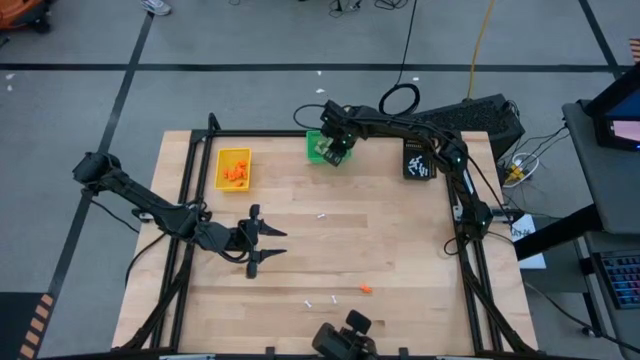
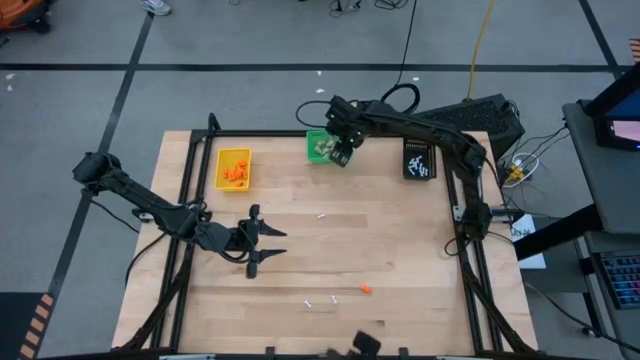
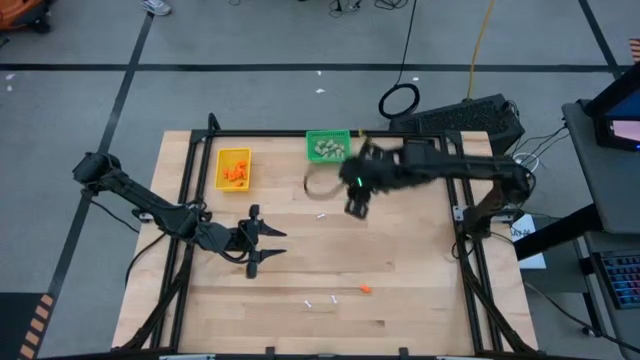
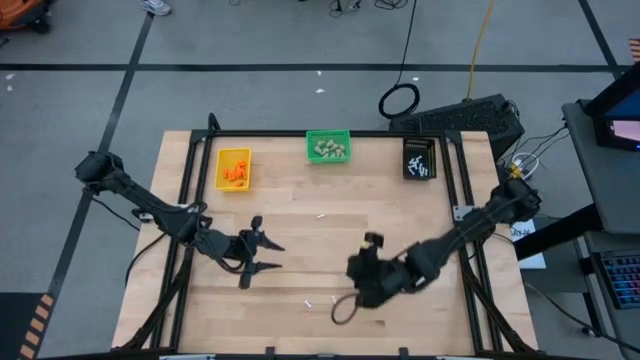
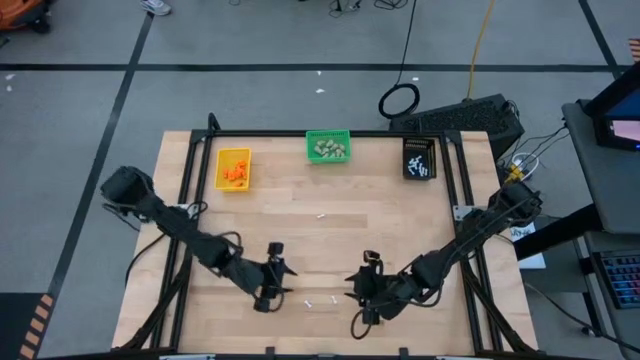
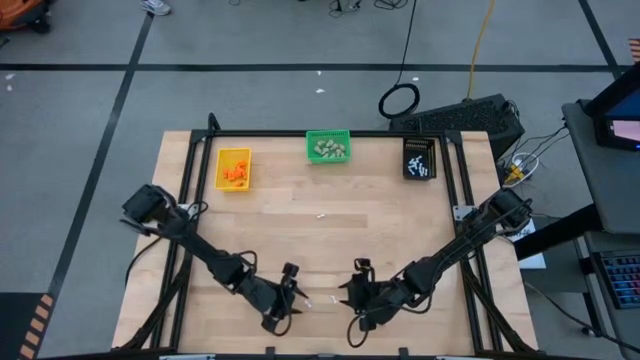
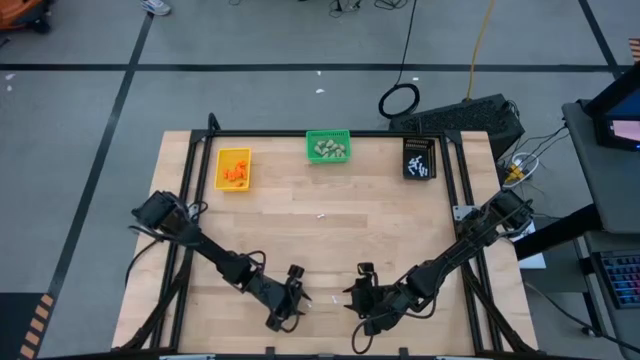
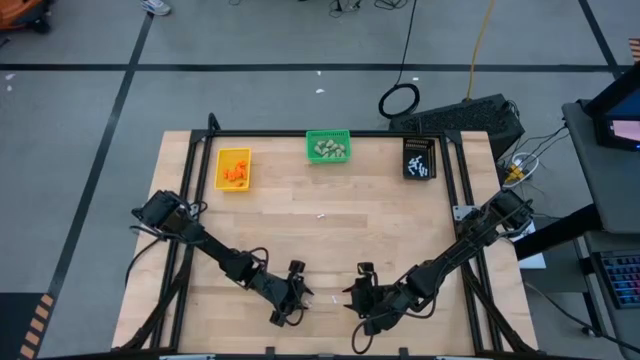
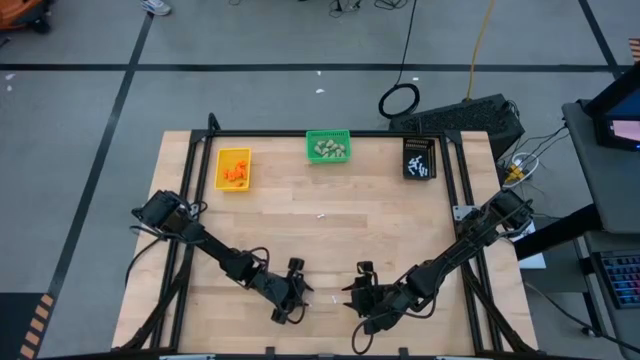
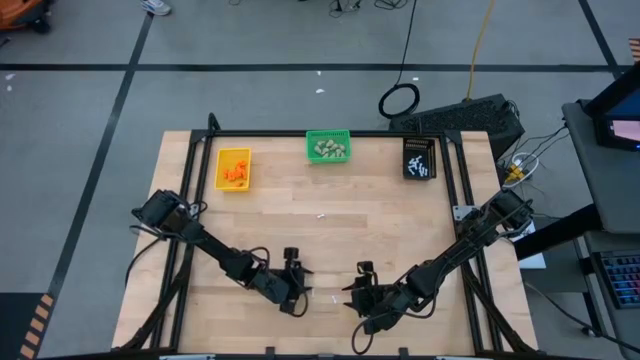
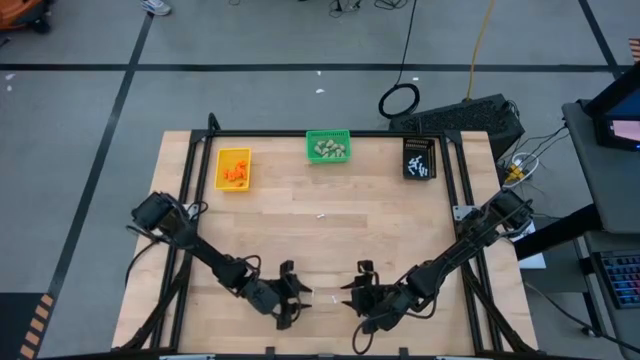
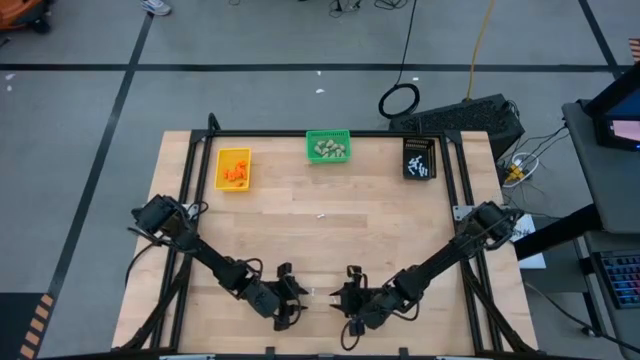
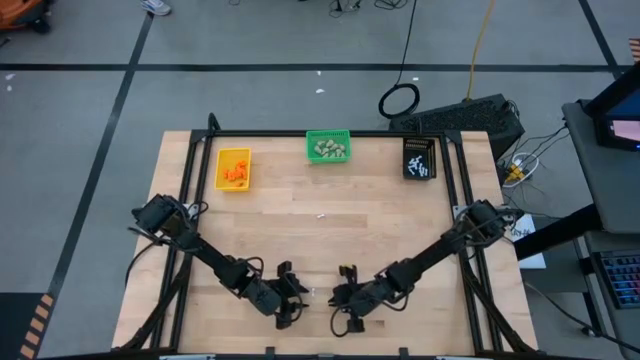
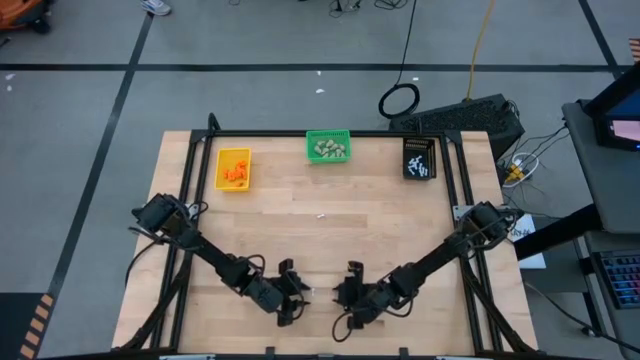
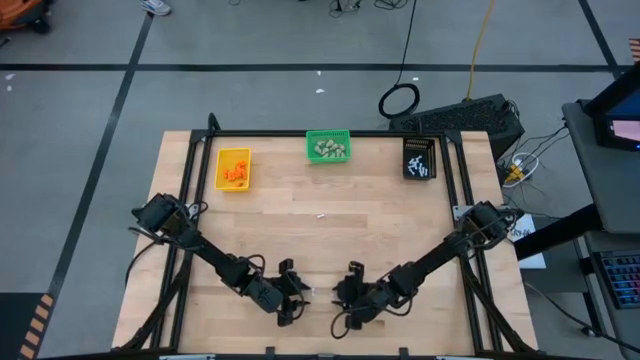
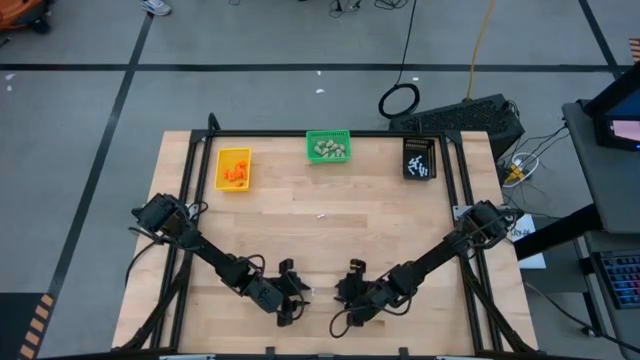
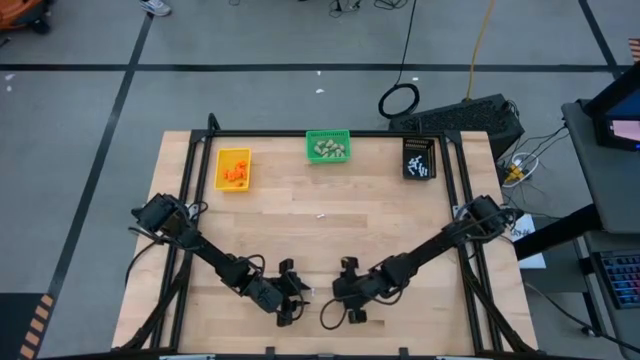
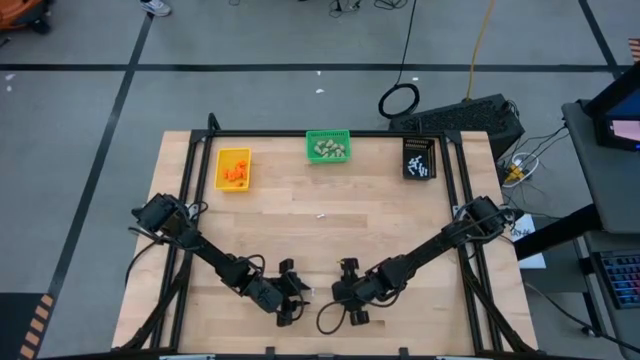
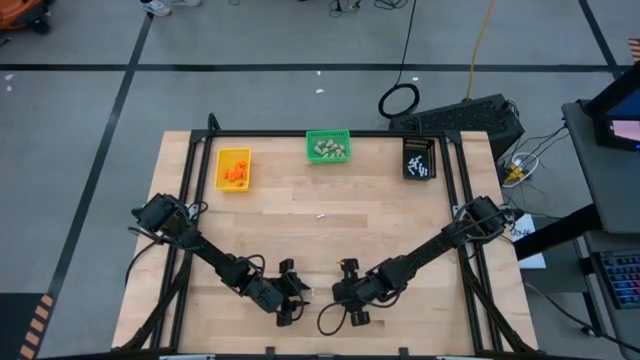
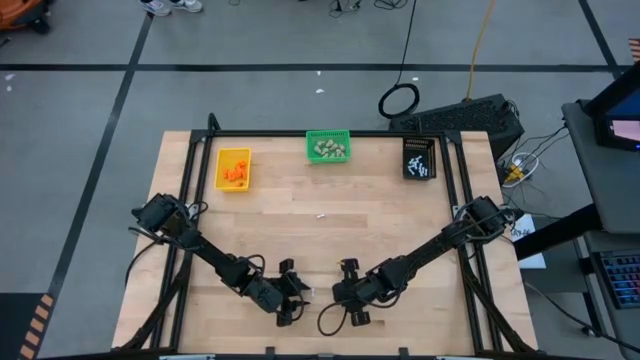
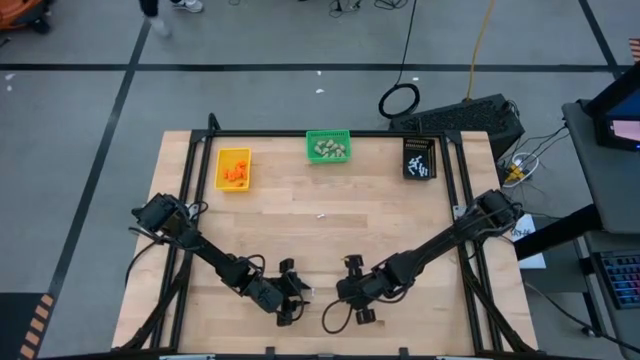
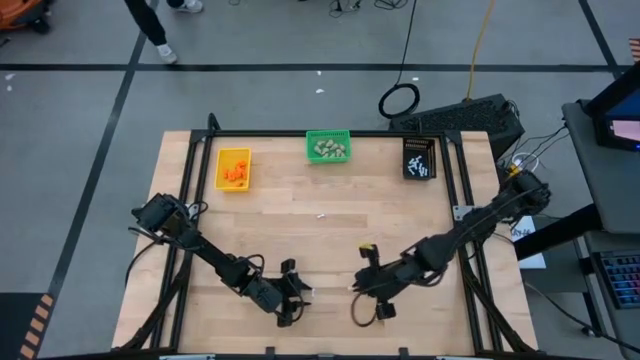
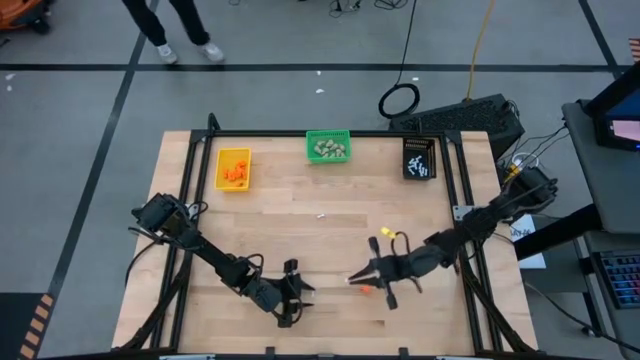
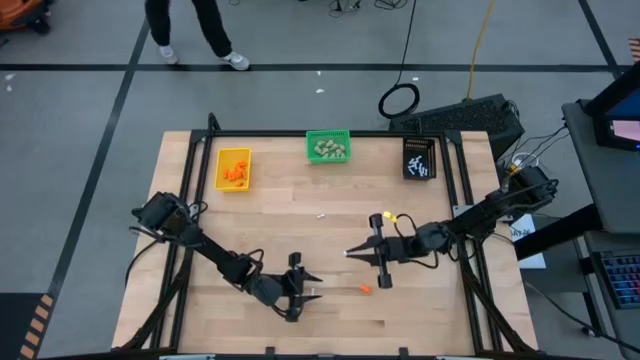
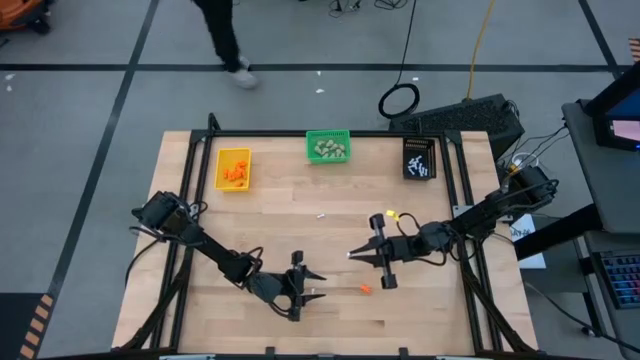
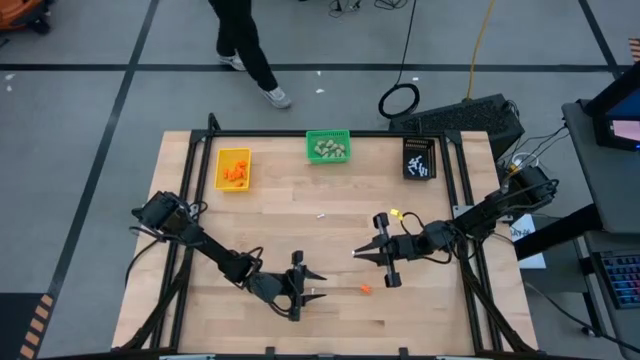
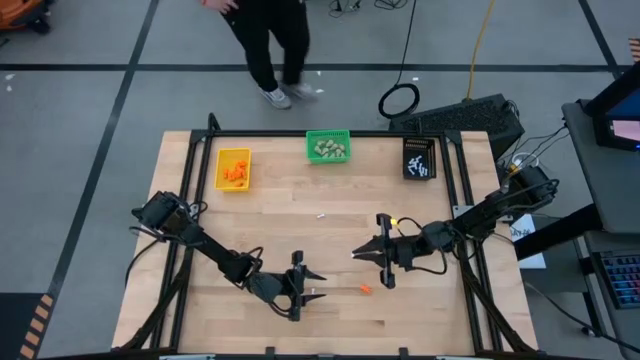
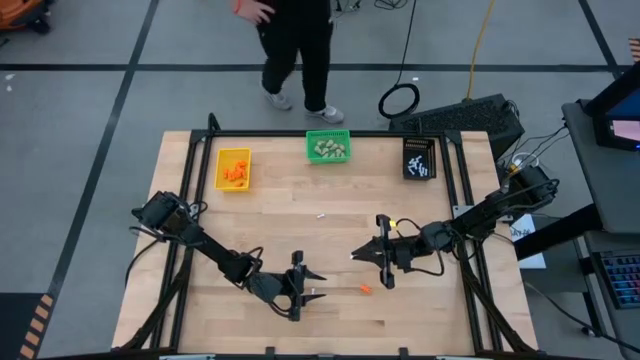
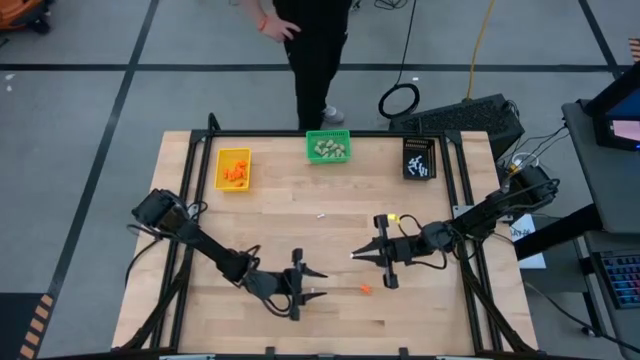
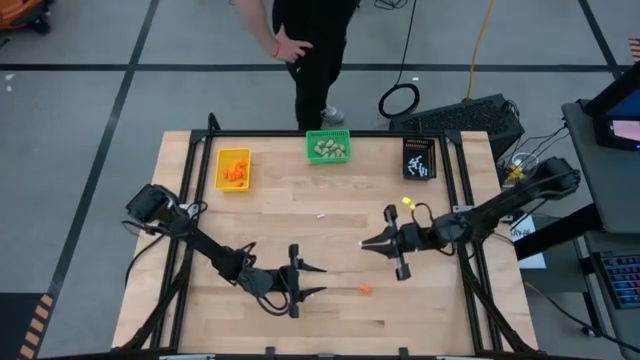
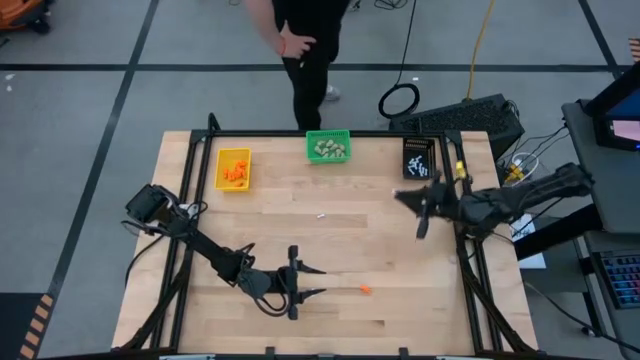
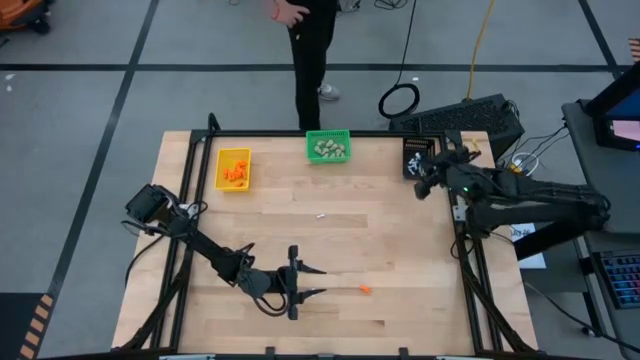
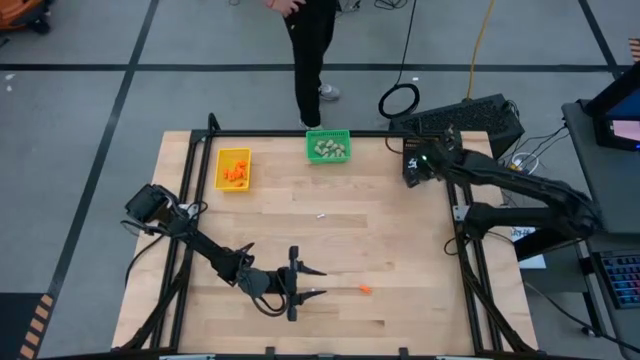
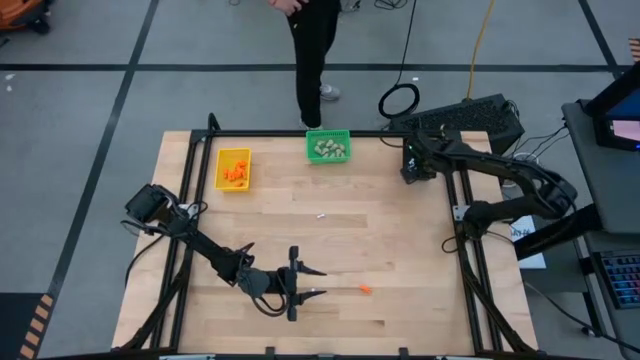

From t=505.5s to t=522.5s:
Task: Sort Halloween decoration
Put the white bone toy into the black bin

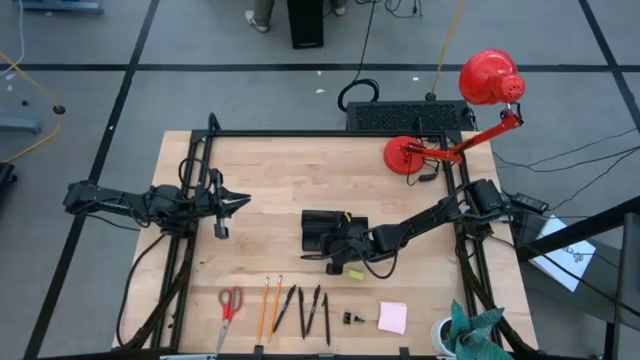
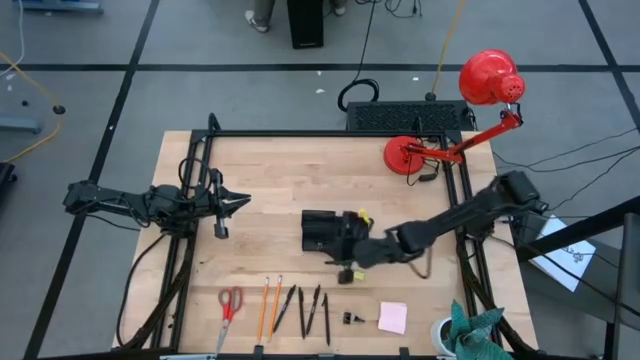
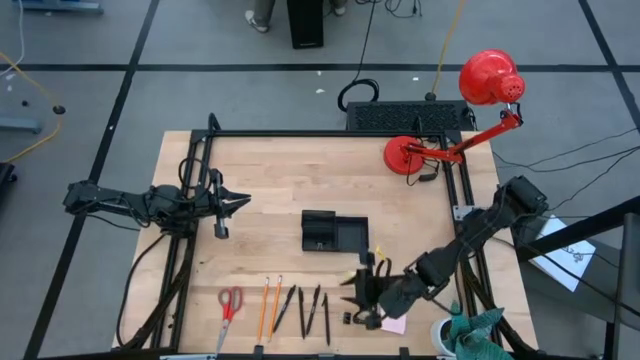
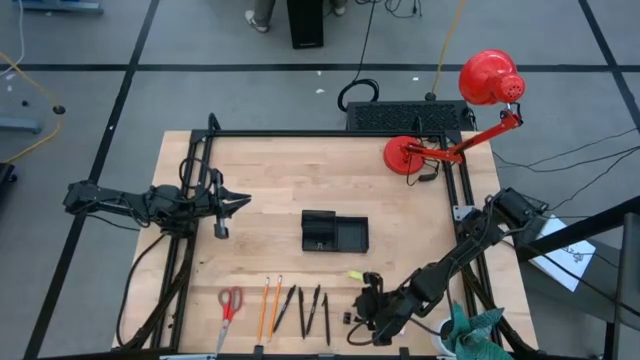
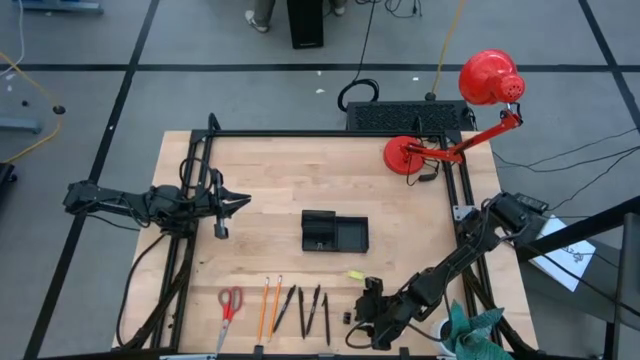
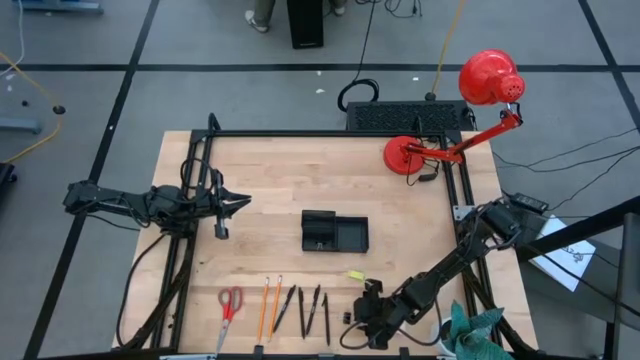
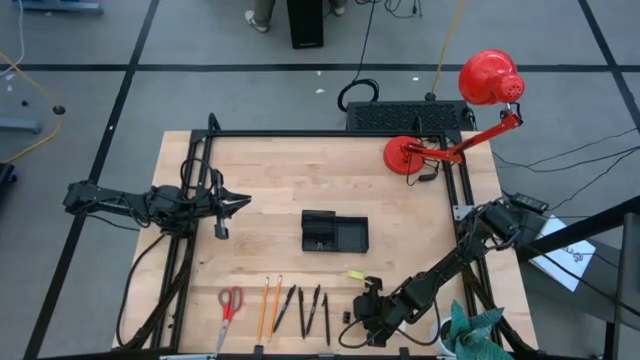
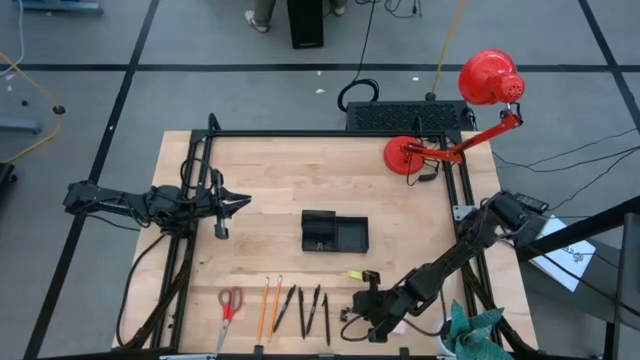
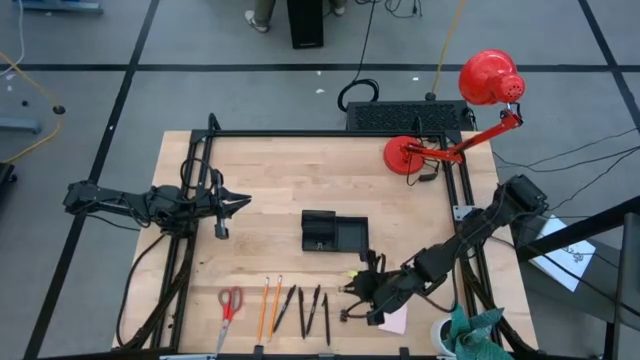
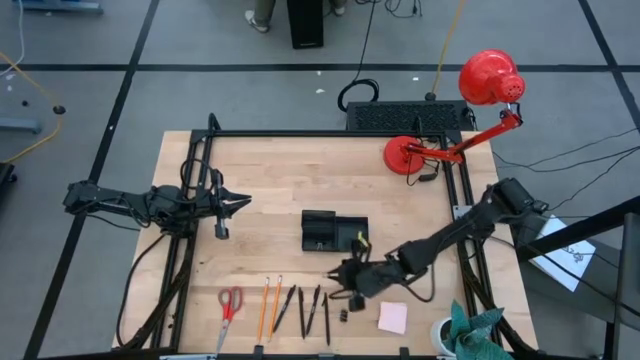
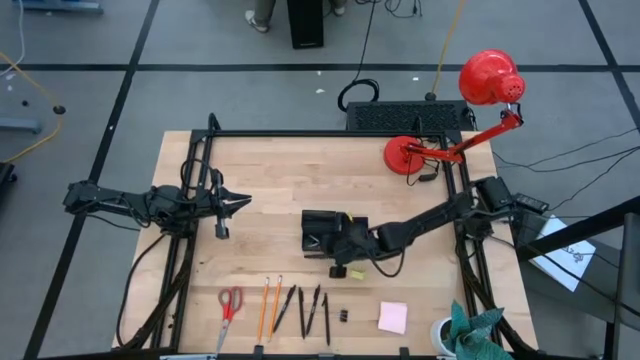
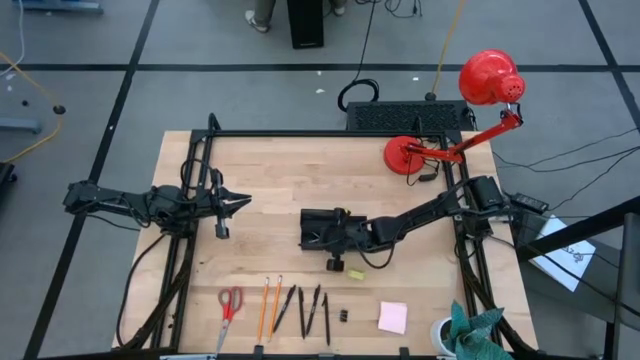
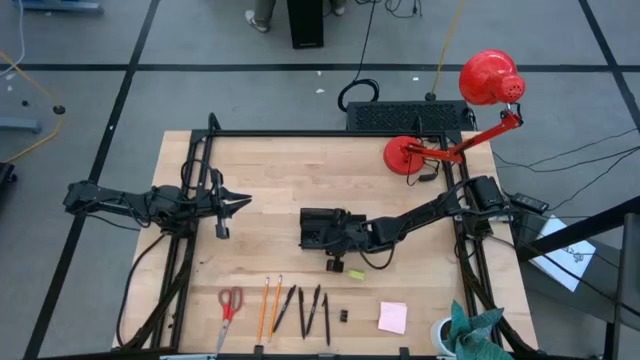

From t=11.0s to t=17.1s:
Task: Pick and place office supplies into organizer
Put the right black binder clip into the desk organizer
